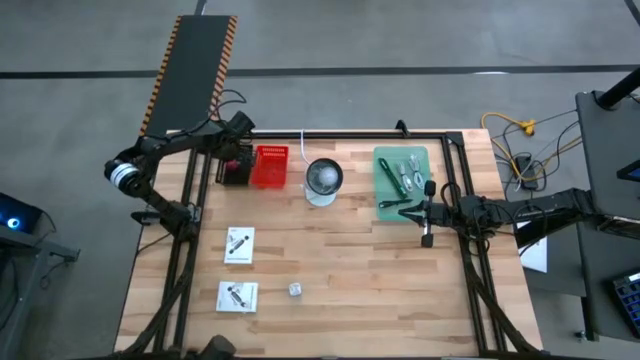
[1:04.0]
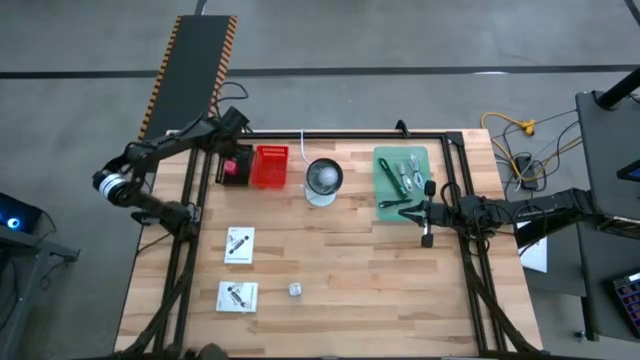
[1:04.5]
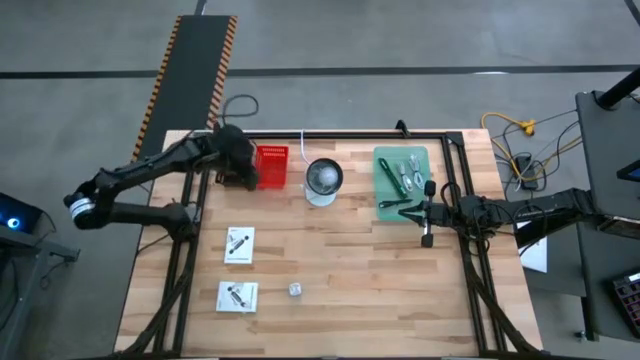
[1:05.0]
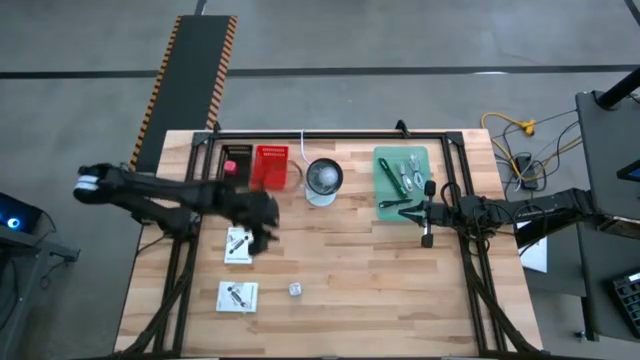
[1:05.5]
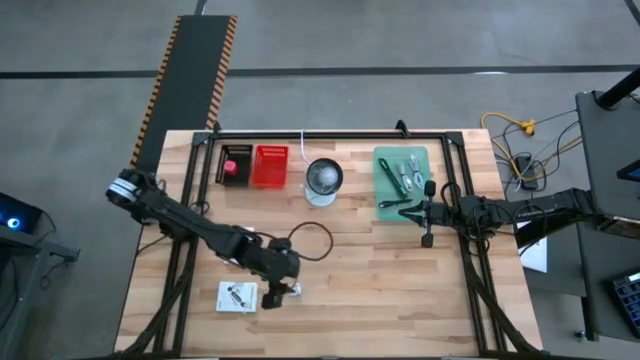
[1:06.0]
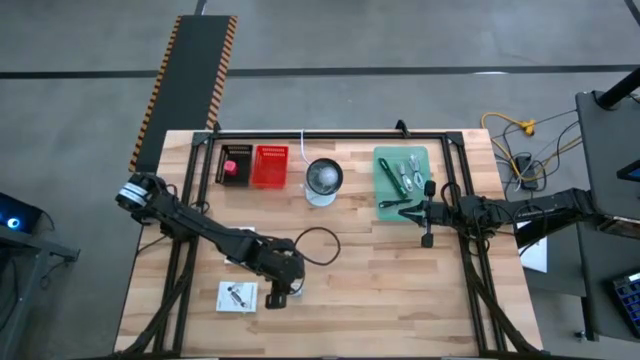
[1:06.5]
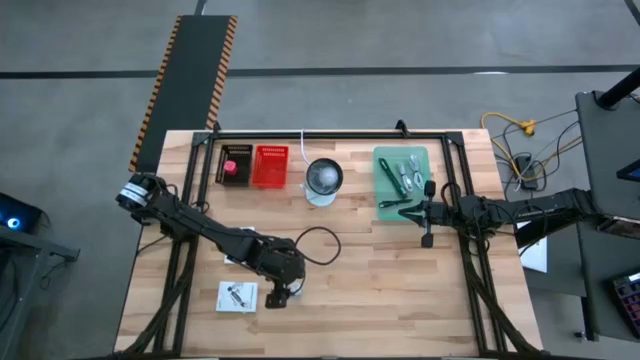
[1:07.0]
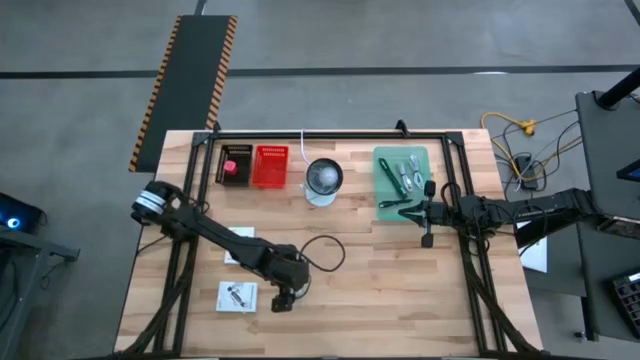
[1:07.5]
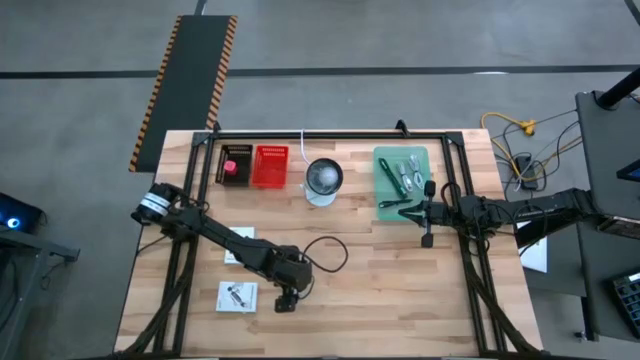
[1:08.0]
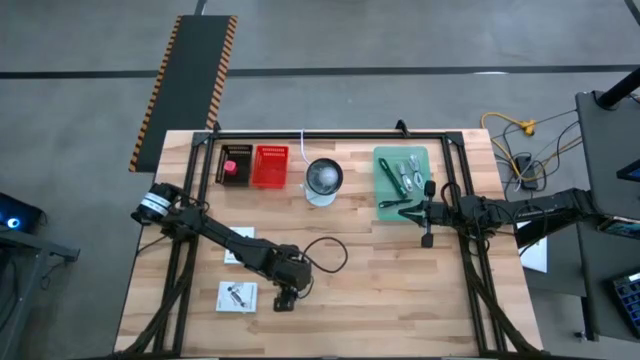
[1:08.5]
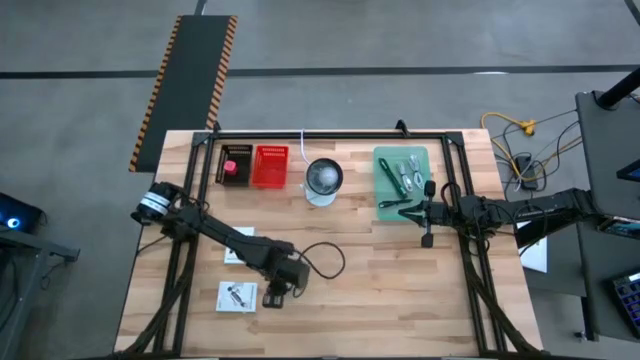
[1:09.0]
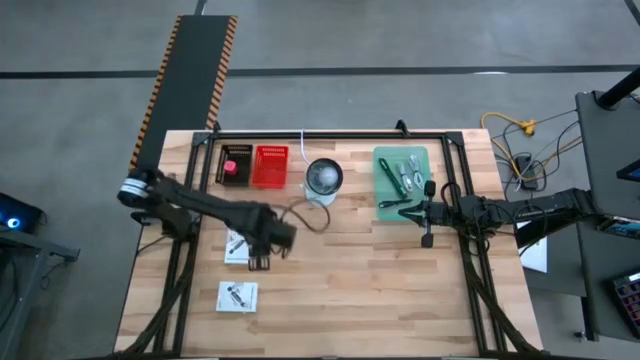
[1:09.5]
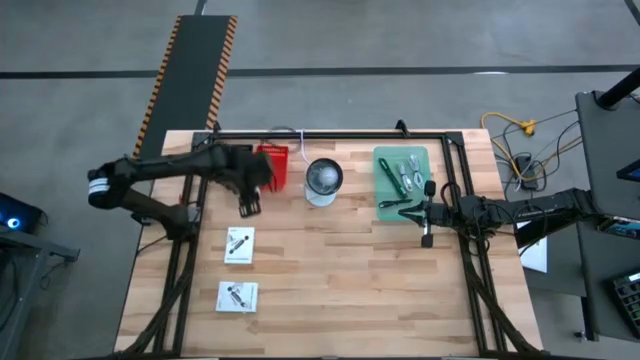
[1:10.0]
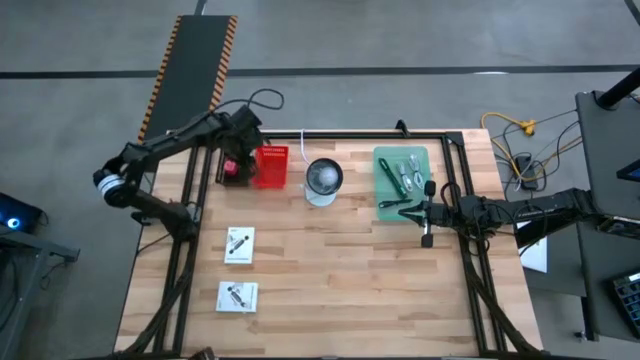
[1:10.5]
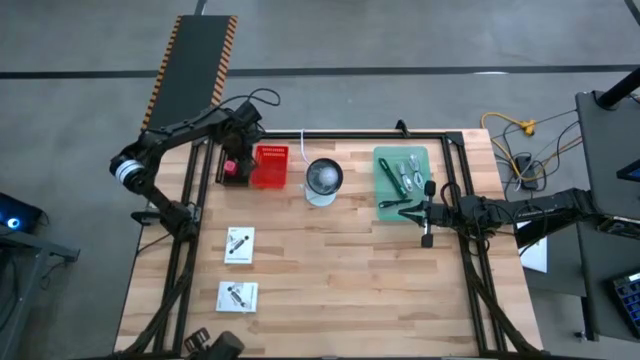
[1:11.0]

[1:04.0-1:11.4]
Task: Pick and place items into bin
Put the blue charger adapter into the black bin

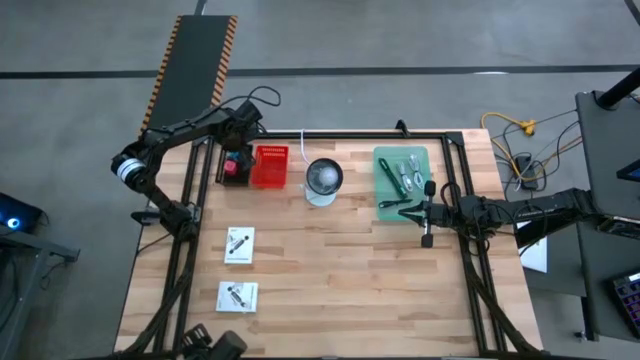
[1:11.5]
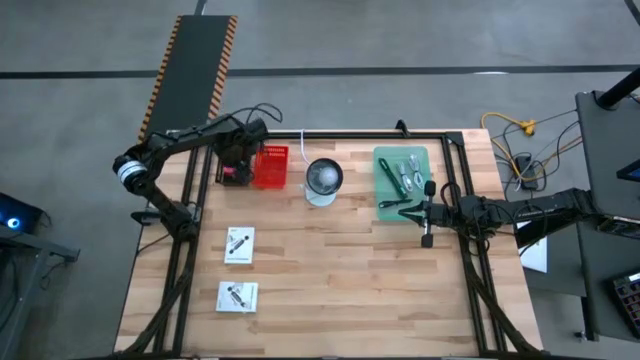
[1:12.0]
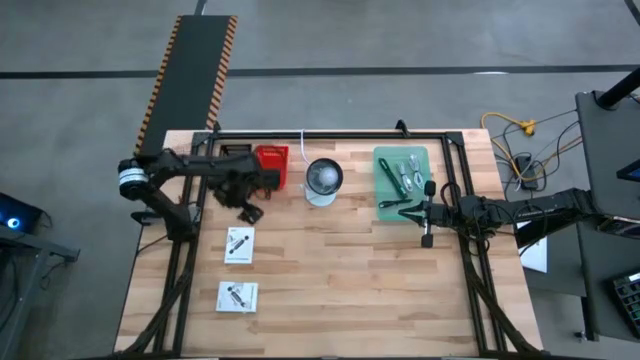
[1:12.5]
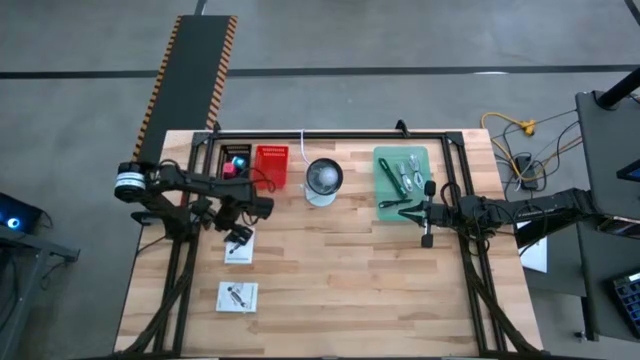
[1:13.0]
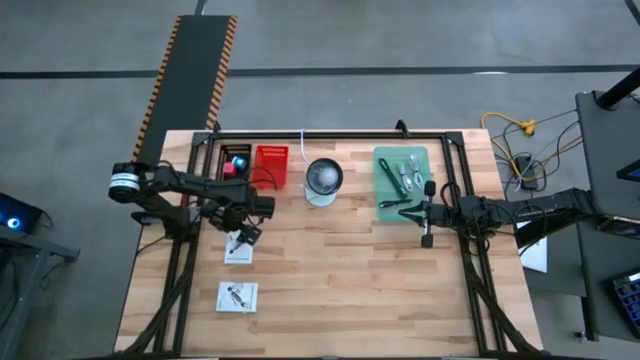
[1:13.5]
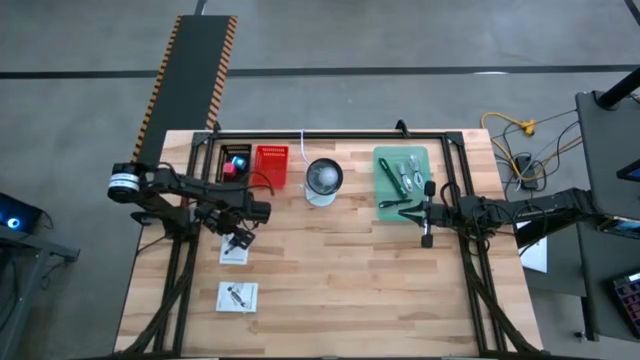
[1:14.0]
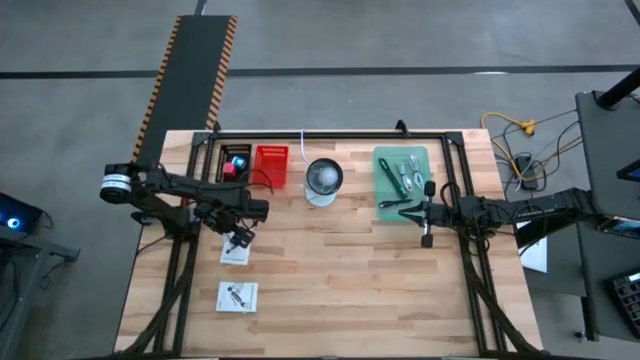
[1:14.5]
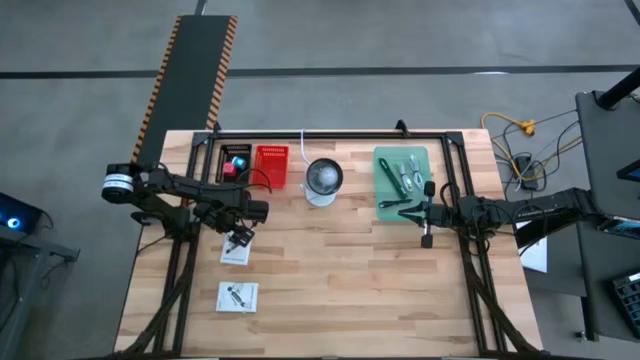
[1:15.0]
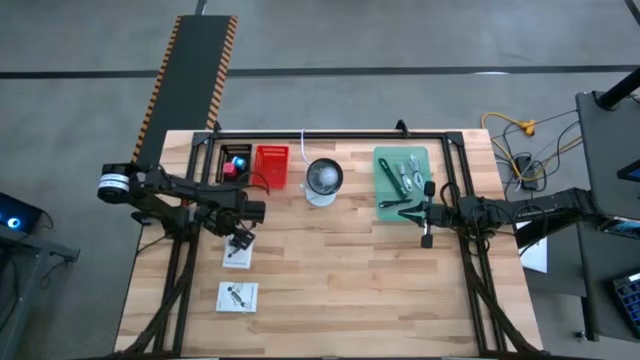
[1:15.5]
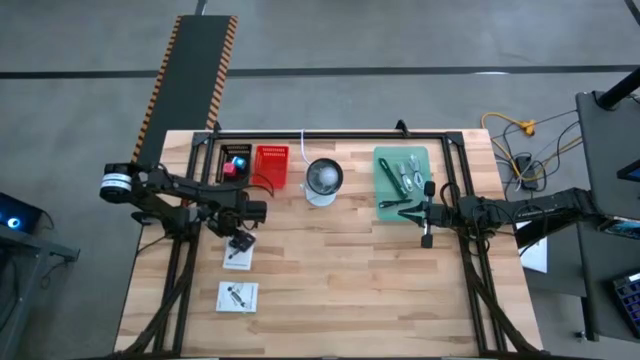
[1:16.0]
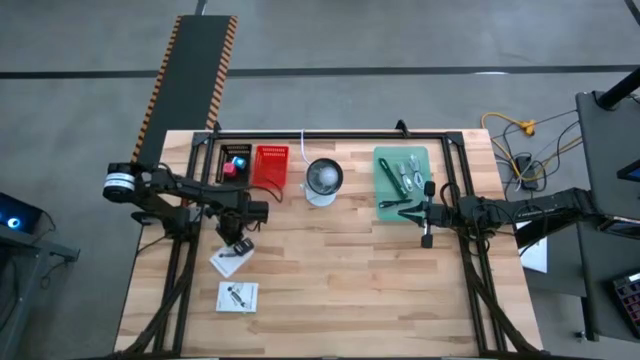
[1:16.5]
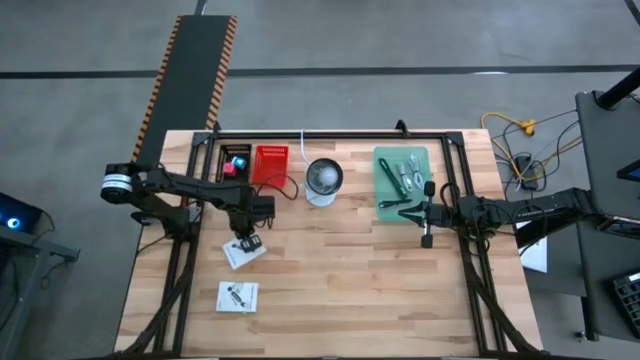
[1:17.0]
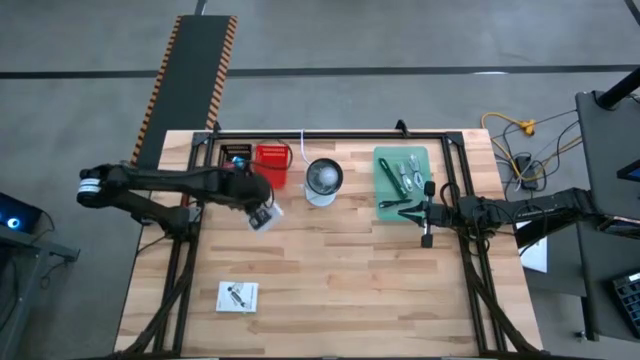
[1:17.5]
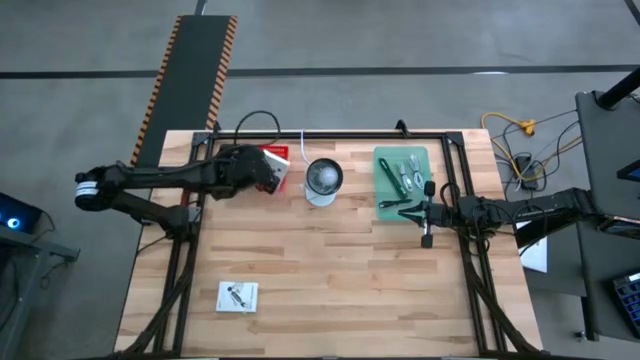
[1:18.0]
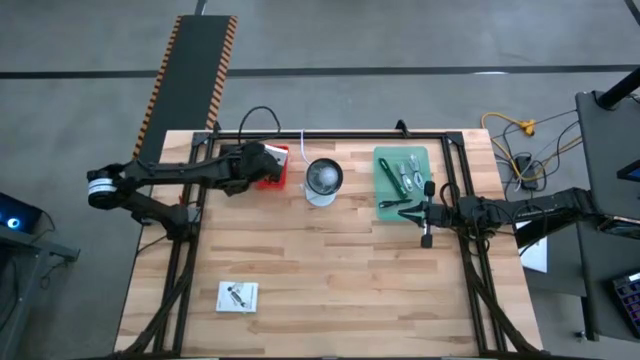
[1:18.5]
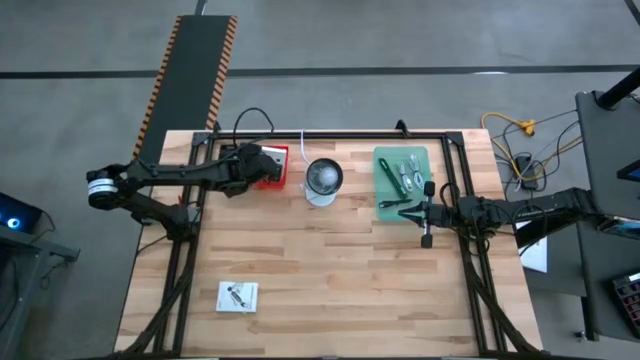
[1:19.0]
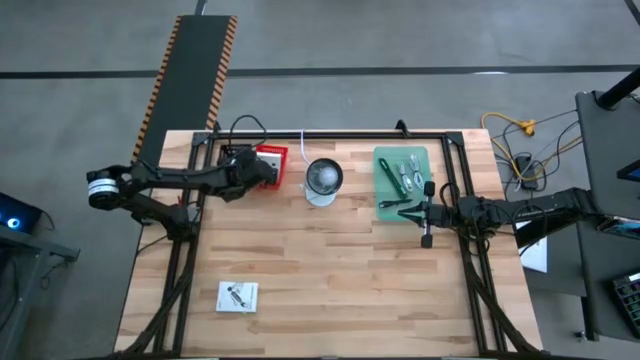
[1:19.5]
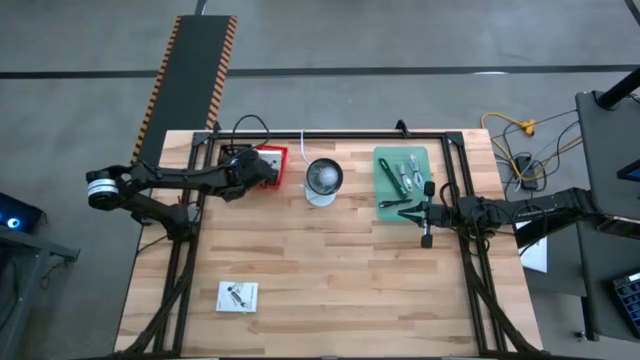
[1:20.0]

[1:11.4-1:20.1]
Put the white card reader box into the red bin

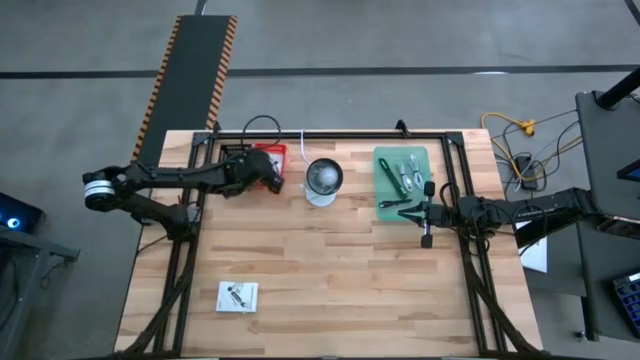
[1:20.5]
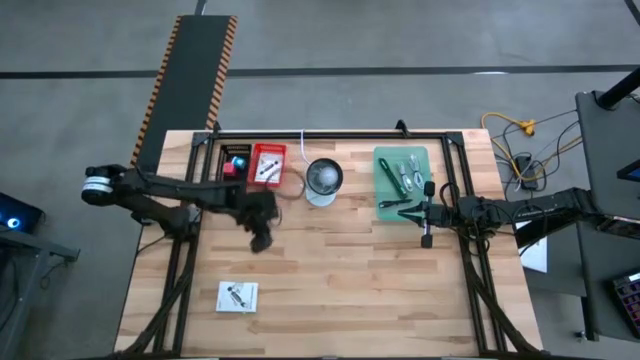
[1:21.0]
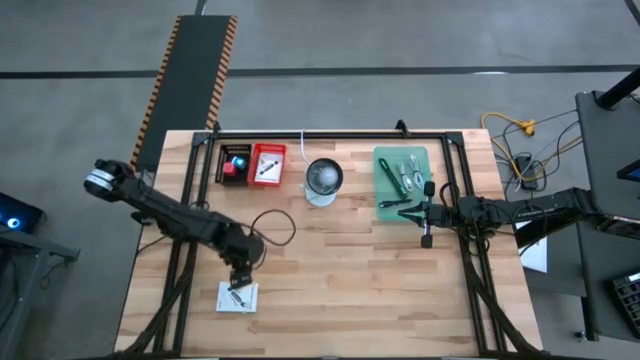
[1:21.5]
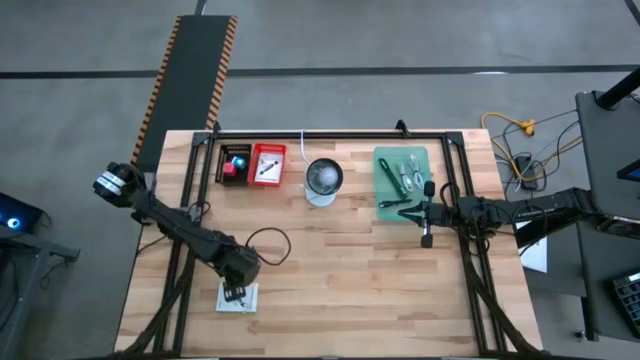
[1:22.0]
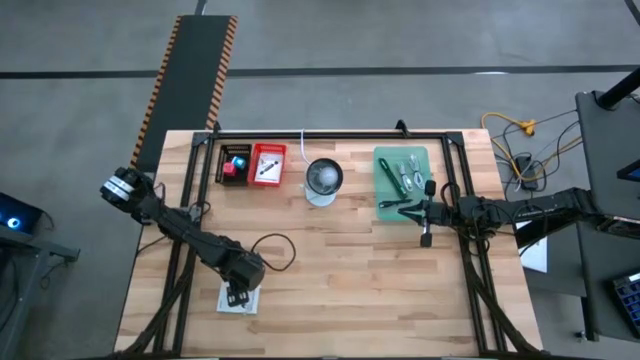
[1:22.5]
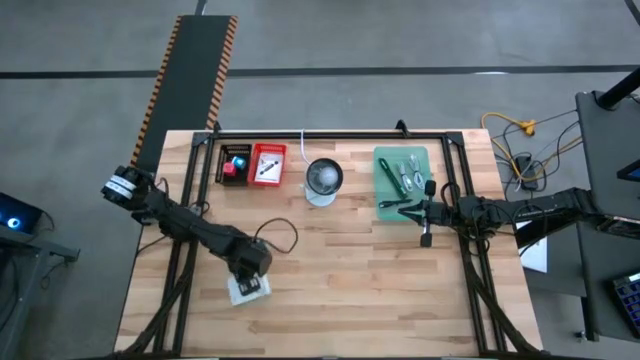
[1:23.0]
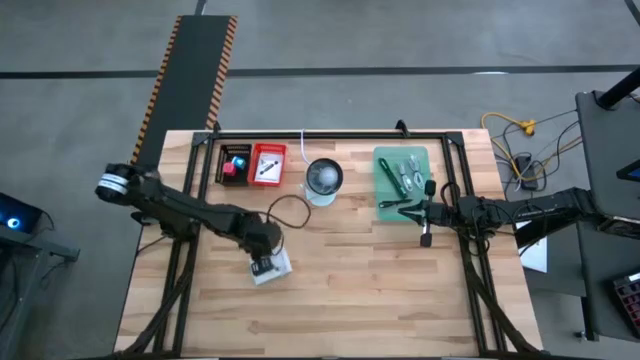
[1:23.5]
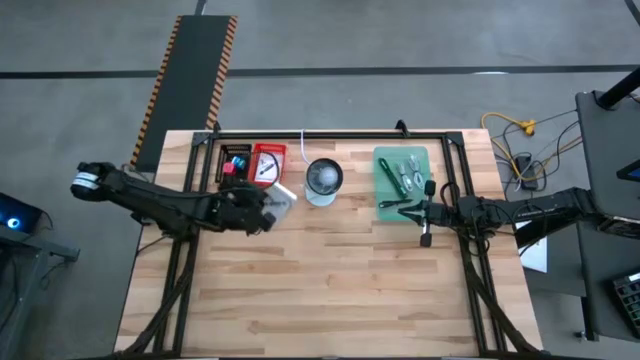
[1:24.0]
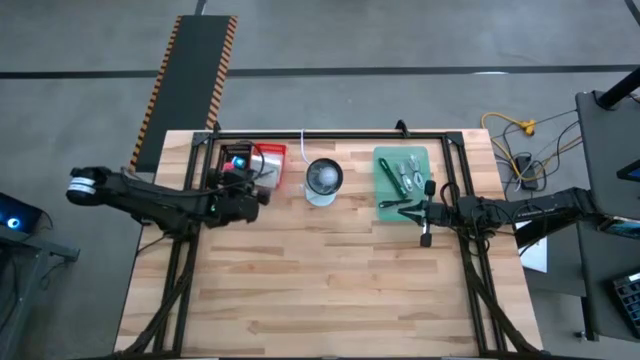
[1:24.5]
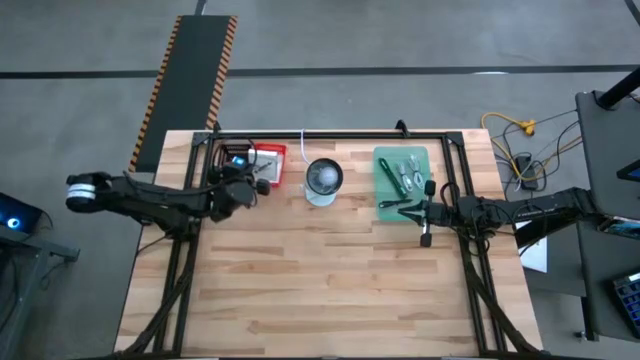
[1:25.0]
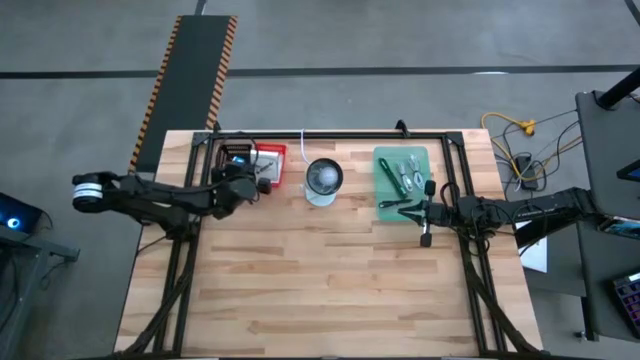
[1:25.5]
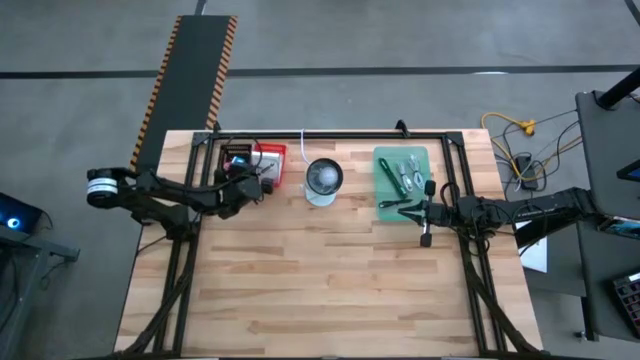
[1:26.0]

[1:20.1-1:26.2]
Put the white card reader box into the red bin
